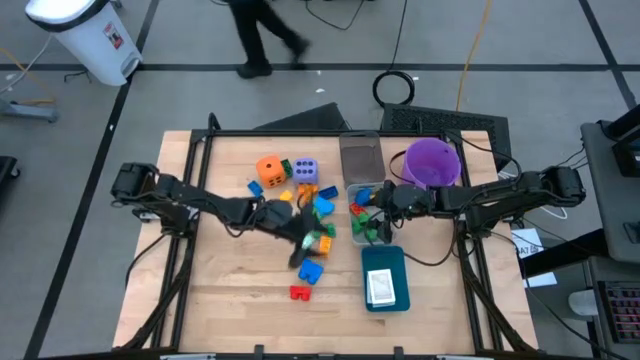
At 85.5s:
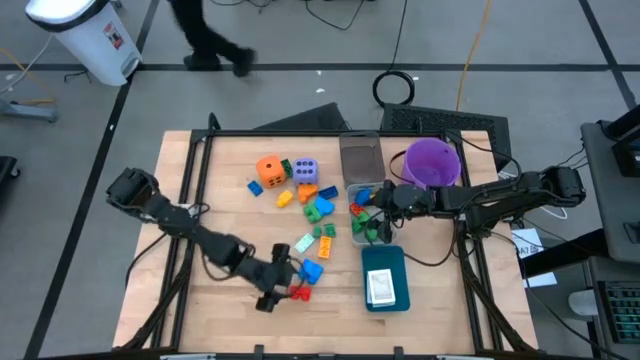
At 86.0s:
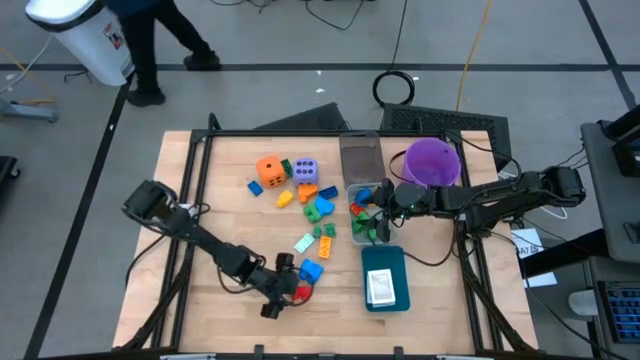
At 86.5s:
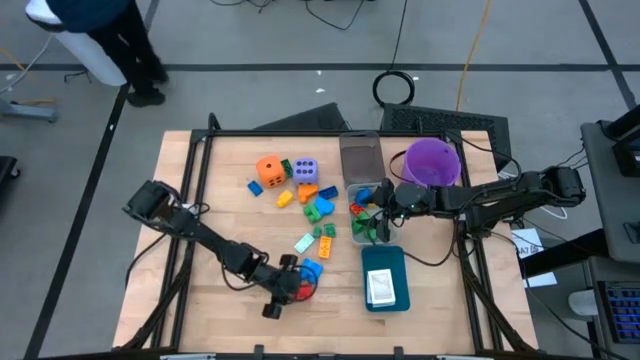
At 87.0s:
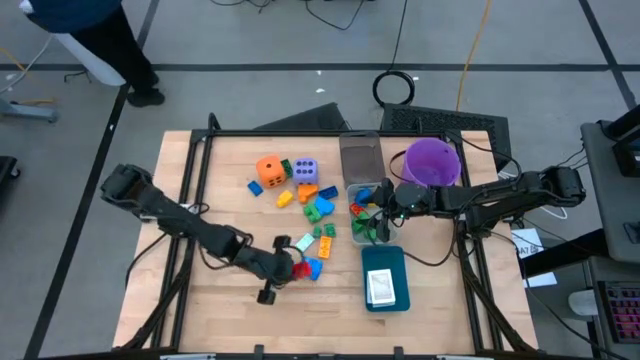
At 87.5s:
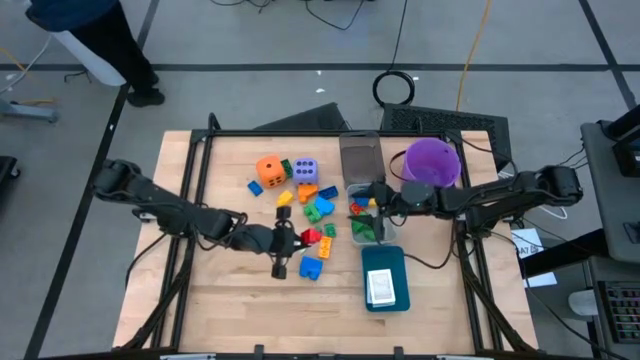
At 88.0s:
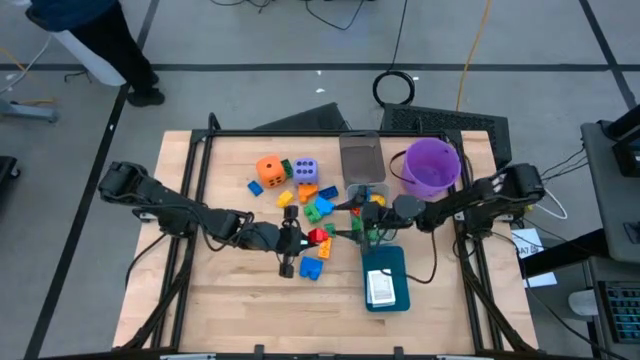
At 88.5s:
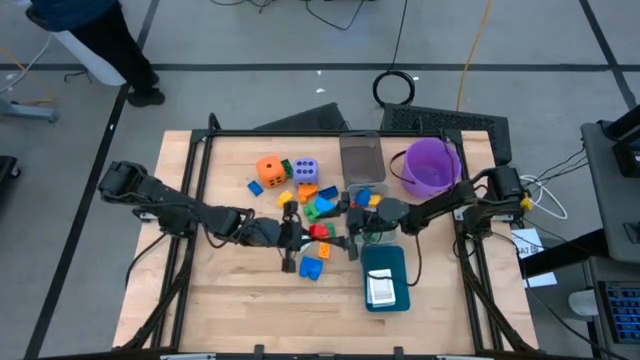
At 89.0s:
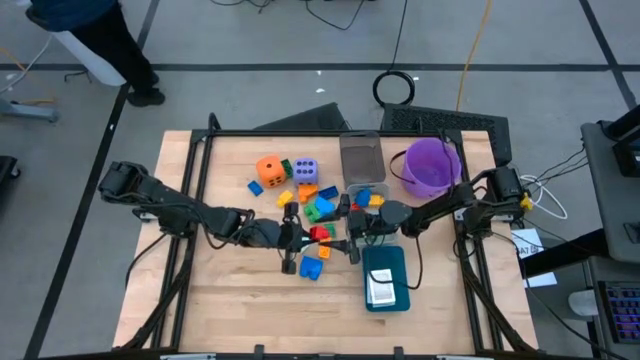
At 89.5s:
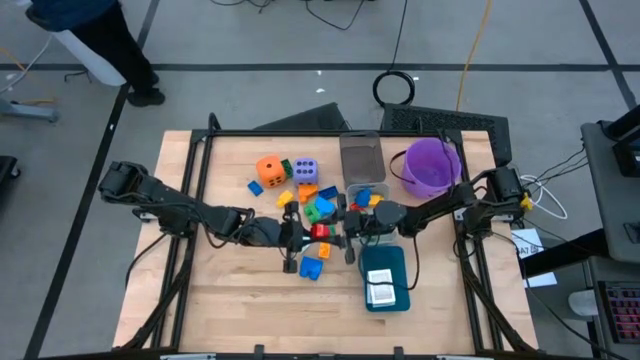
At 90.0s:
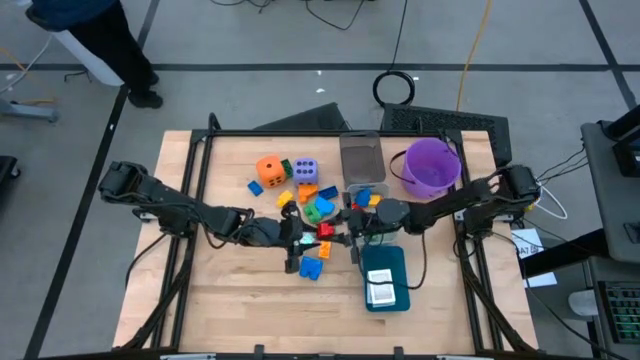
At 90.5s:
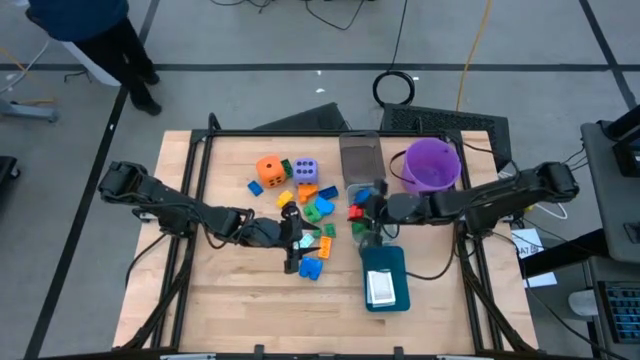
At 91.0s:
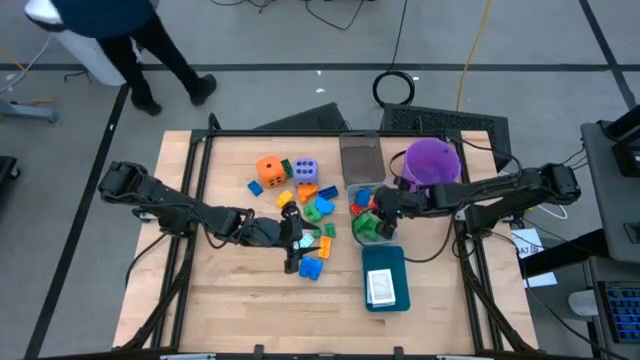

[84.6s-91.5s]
Task: Pick & Place Toys
Put the red game piece into the gray bin

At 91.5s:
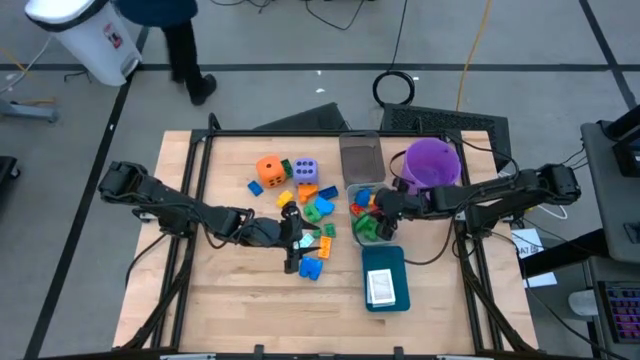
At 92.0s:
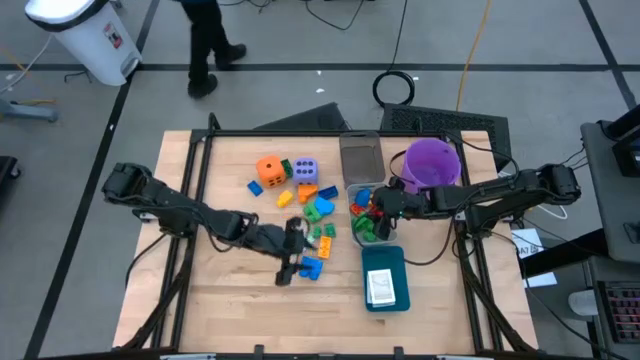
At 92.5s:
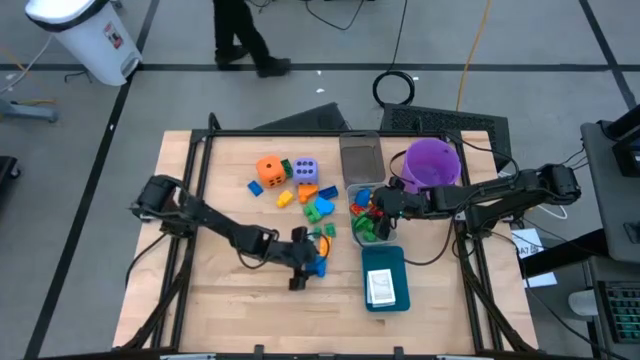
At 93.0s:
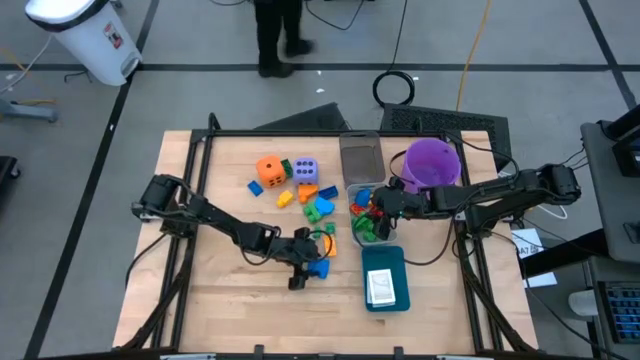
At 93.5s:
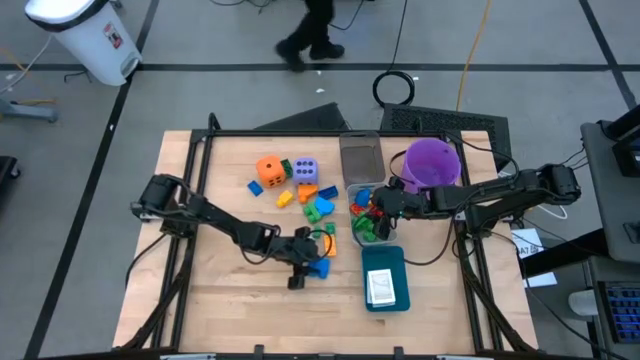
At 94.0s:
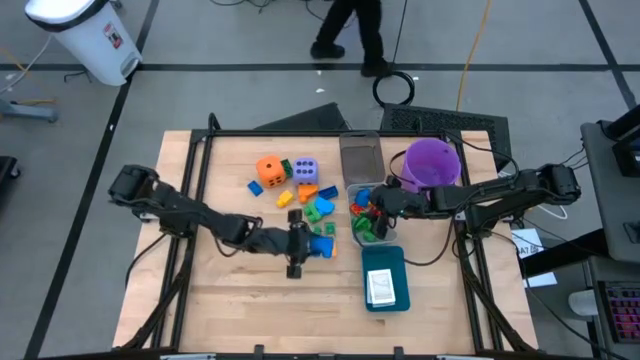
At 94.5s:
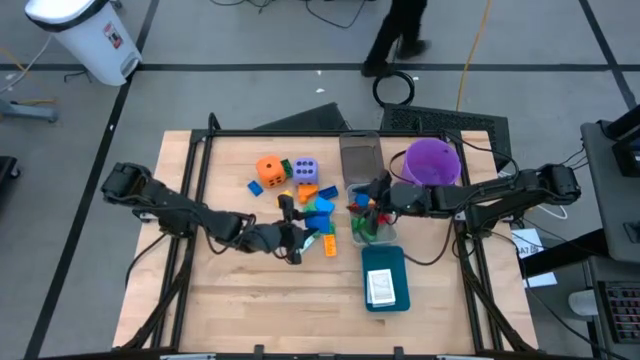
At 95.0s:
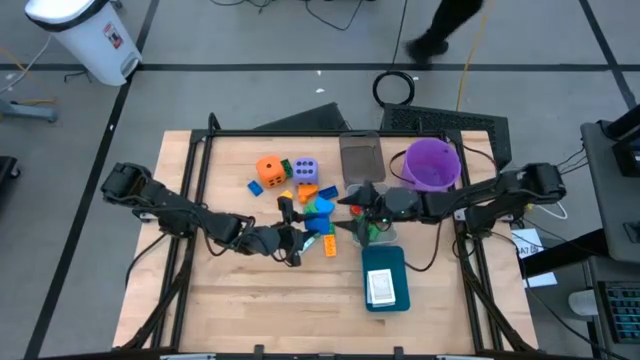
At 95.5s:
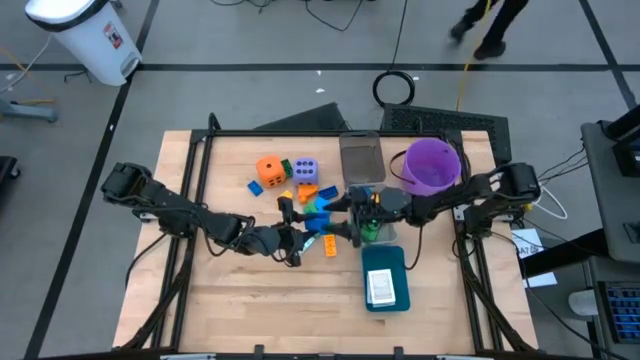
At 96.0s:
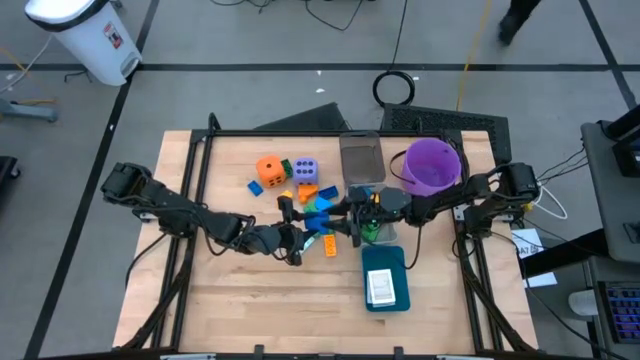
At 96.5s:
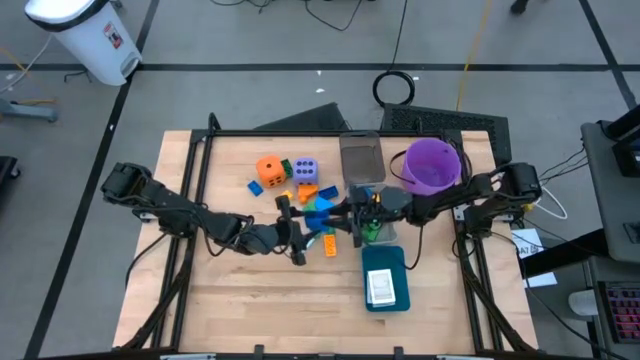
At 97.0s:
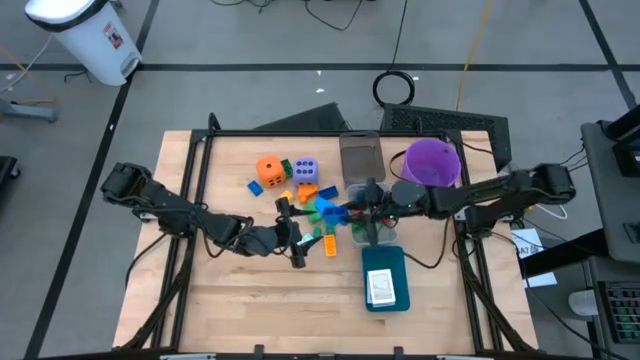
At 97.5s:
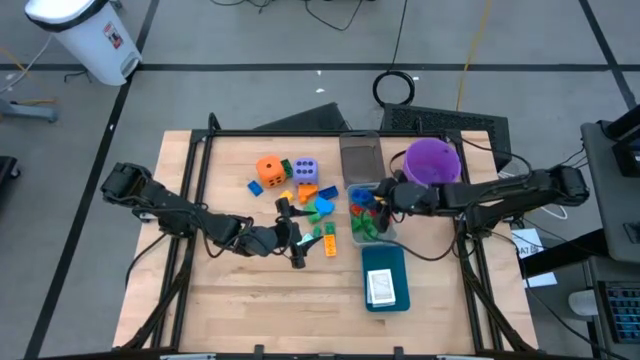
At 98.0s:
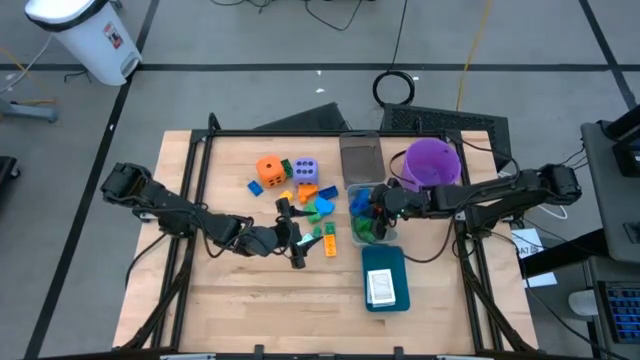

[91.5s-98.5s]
Put the blue game piece into the gray bin

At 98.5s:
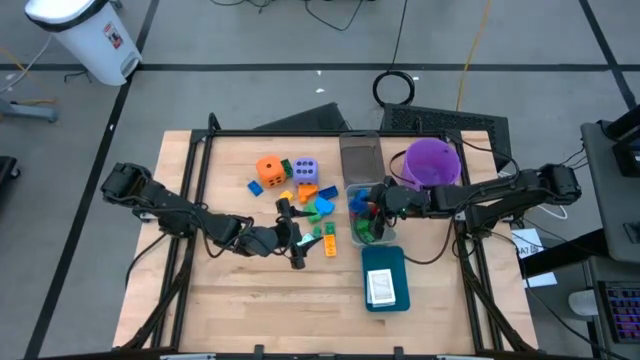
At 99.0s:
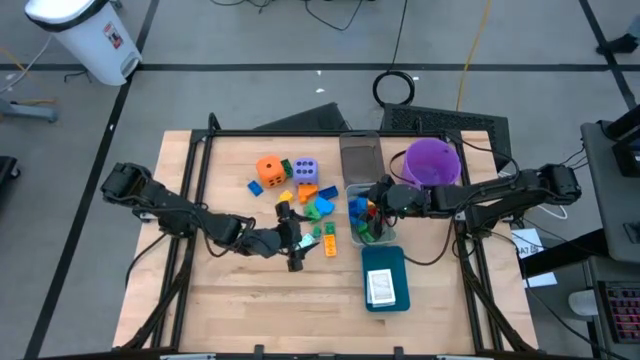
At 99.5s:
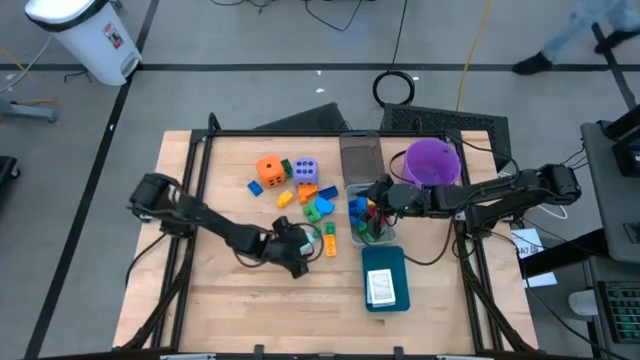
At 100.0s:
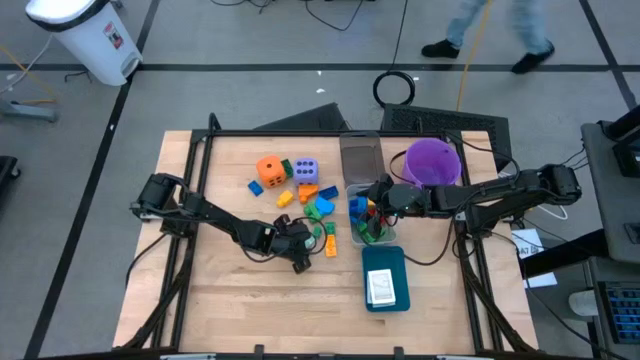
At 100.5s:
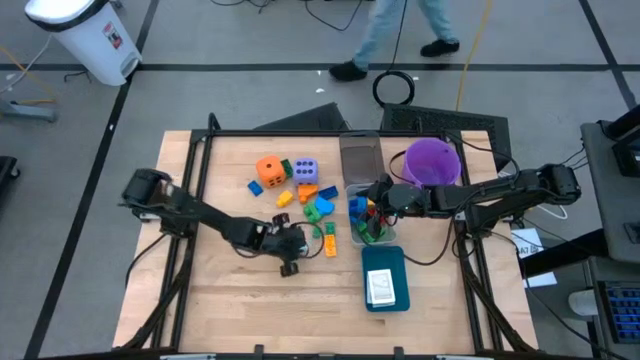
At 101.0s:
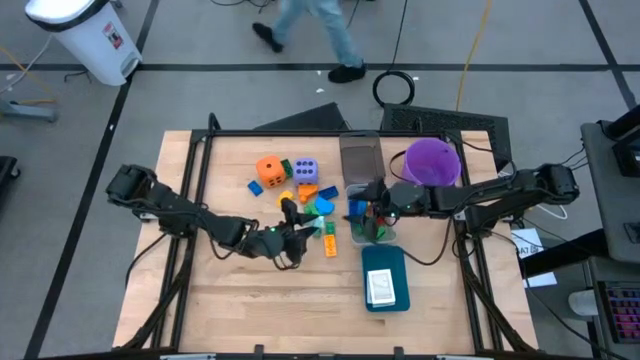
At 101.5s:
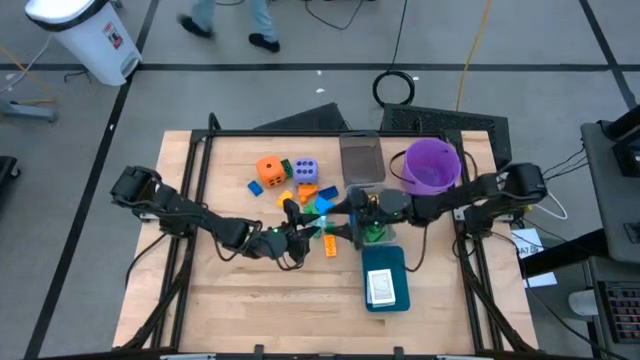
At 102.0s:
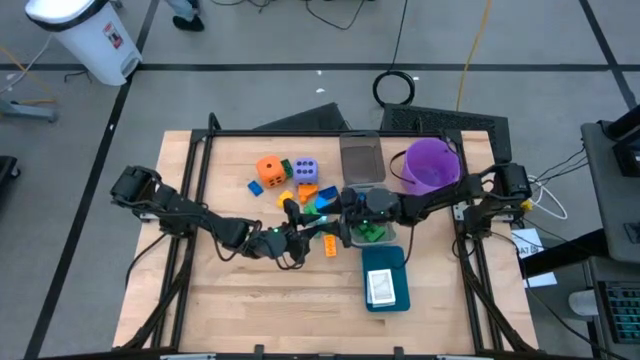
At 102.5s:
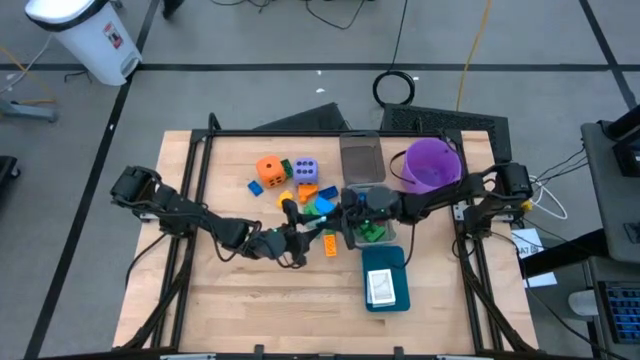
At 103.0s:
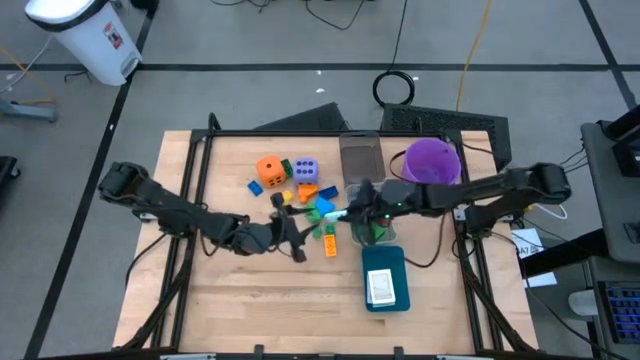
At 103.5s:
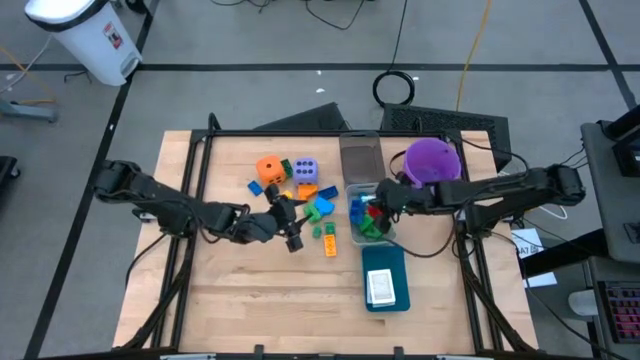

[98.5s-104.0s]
Put the white game piece into the gray bin

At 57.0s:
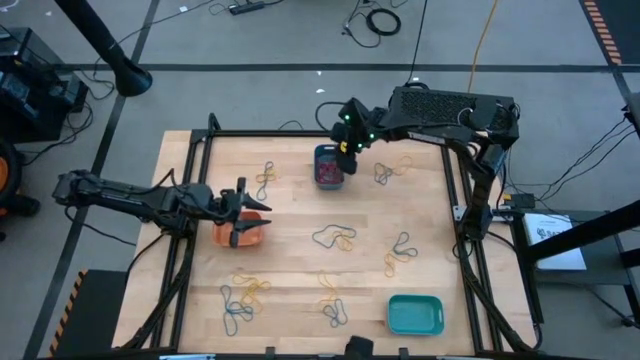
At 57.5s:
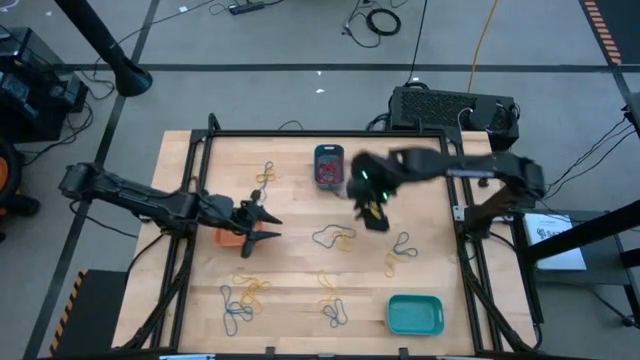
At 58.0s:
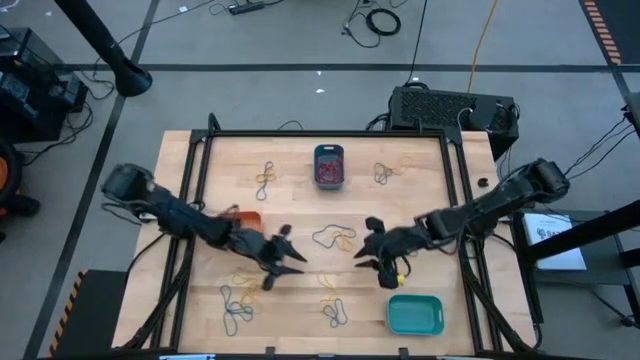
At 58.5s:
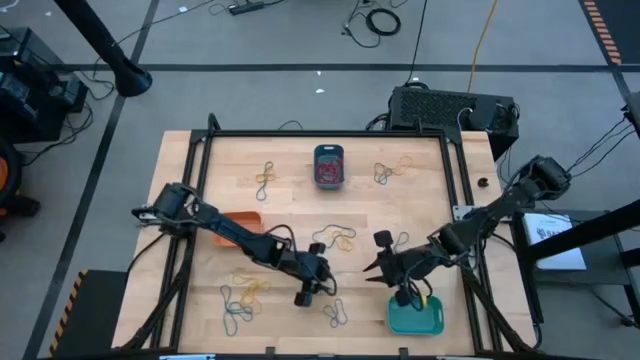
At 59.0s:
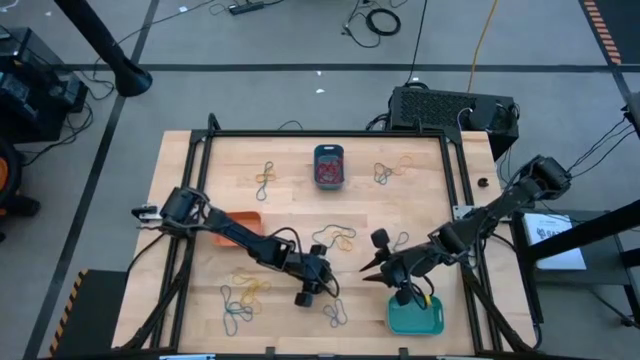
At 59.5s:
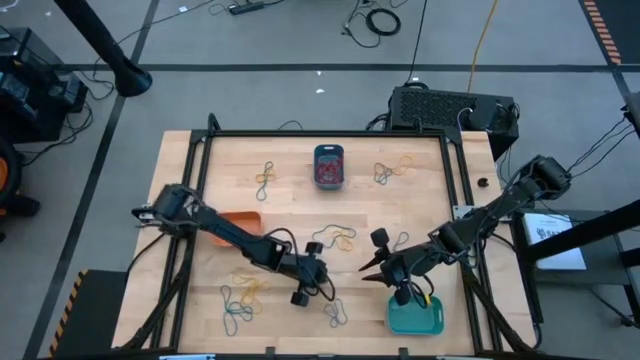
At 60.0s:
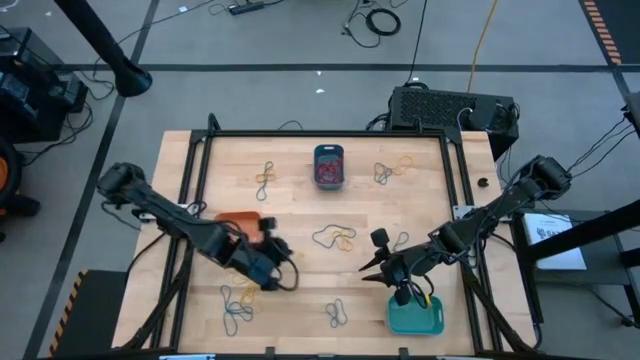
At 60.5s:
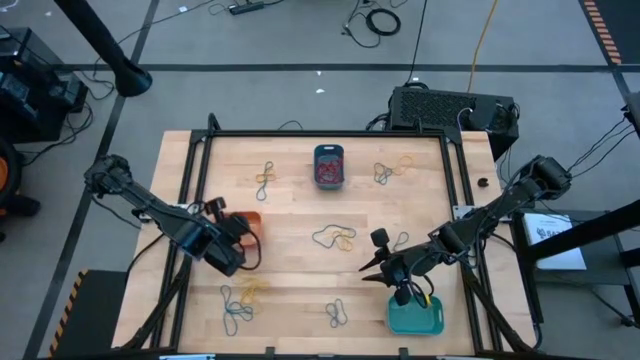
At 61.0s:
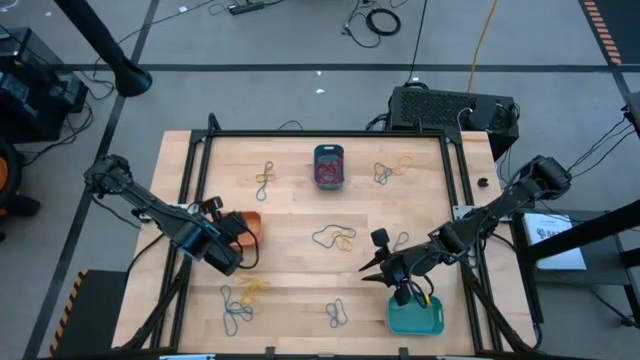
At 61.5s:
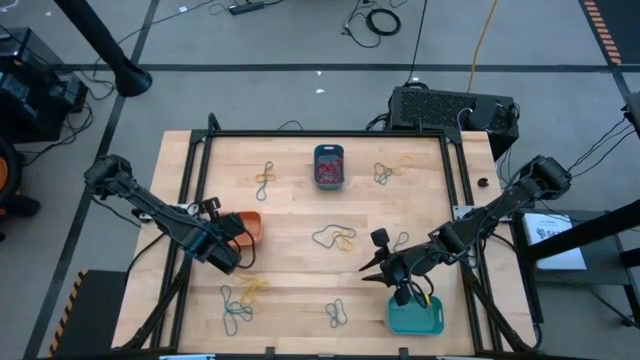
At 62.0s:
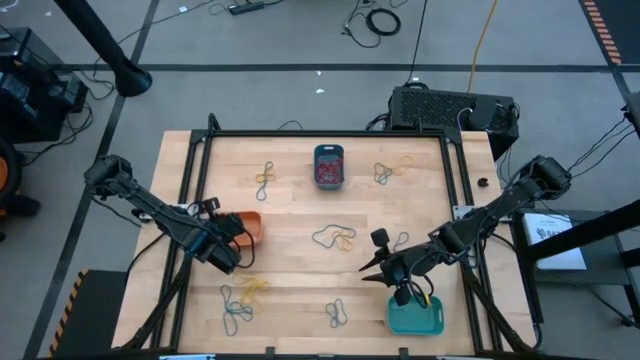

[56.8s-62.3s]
Task: Sort rubber bands into baskets
Put the bottom center yellow rubber band into the orange bin
